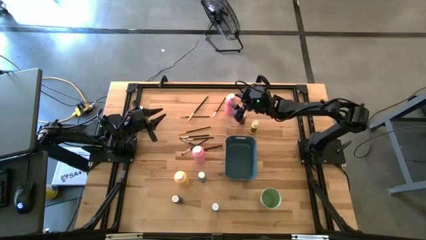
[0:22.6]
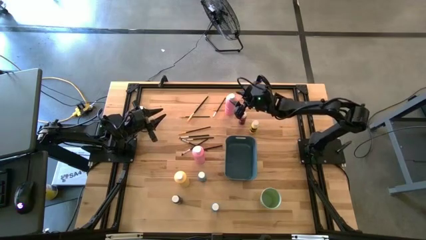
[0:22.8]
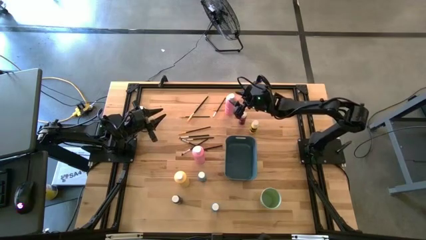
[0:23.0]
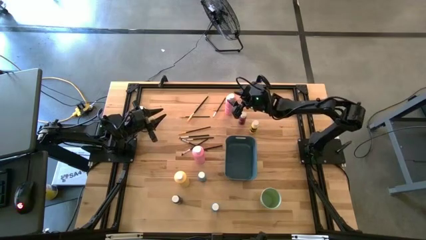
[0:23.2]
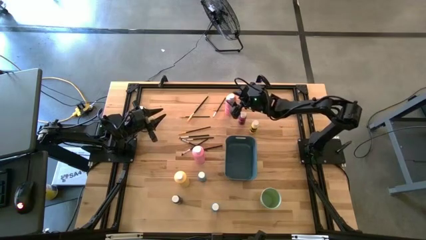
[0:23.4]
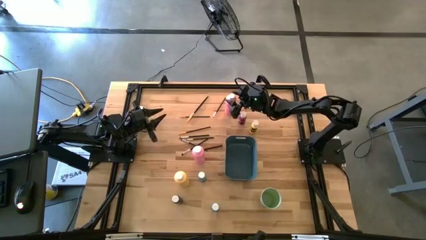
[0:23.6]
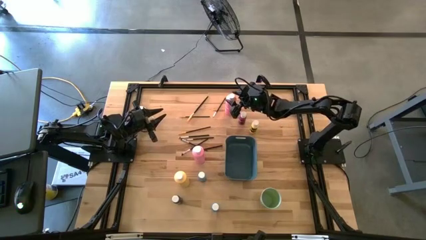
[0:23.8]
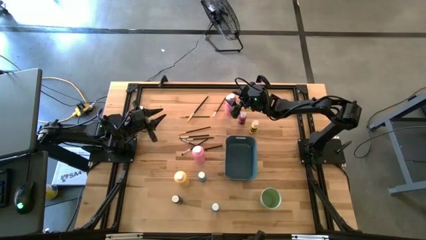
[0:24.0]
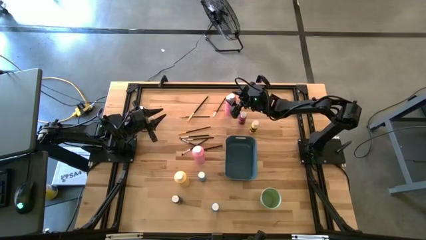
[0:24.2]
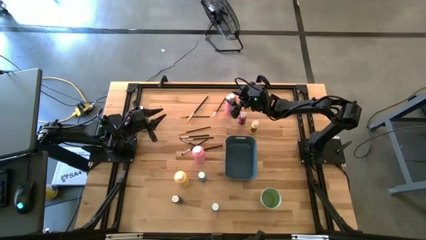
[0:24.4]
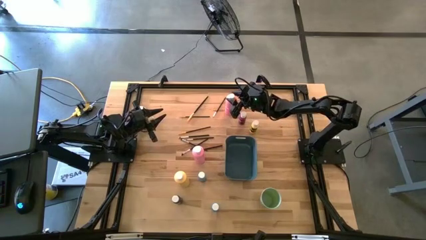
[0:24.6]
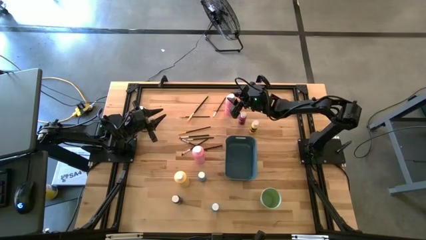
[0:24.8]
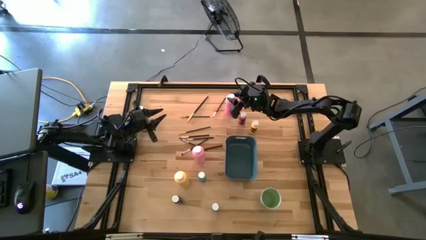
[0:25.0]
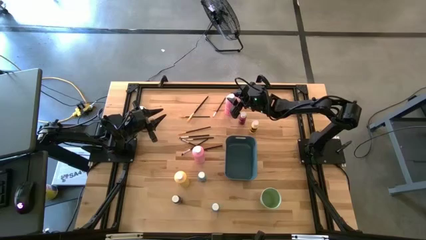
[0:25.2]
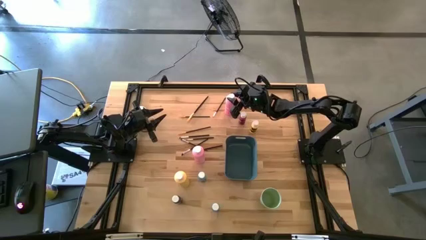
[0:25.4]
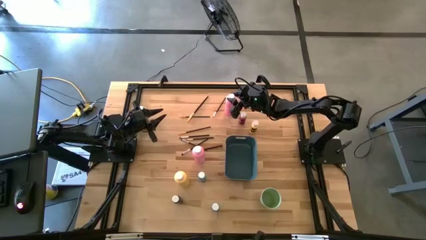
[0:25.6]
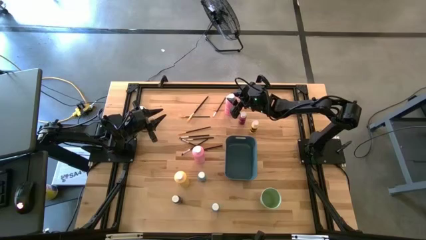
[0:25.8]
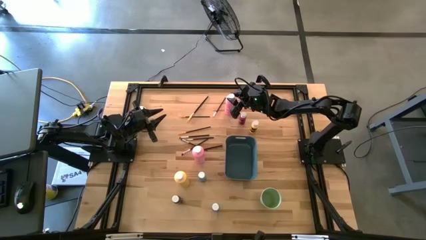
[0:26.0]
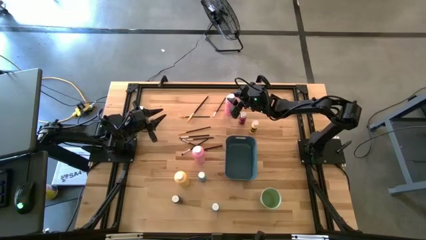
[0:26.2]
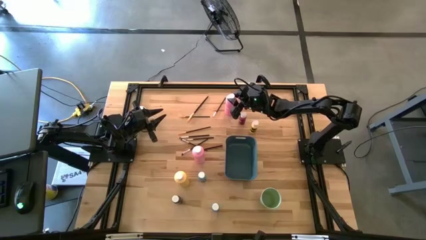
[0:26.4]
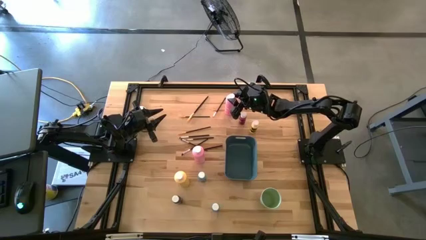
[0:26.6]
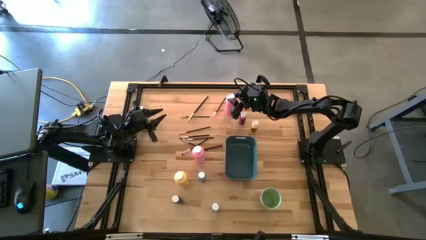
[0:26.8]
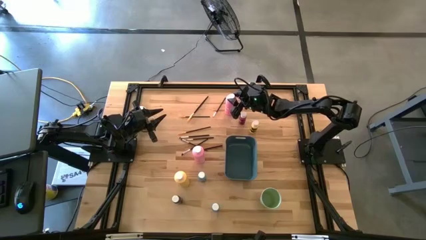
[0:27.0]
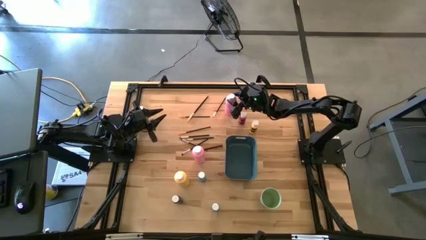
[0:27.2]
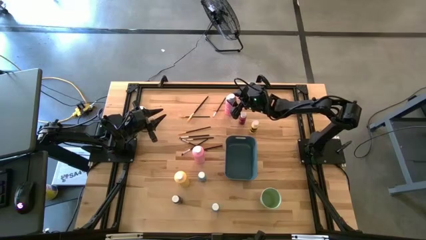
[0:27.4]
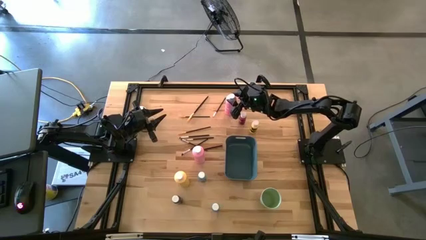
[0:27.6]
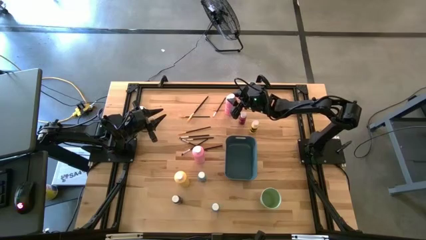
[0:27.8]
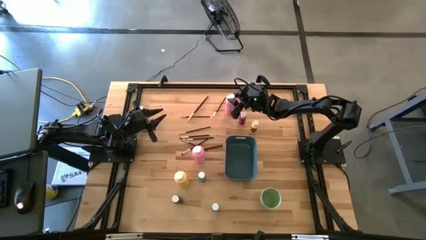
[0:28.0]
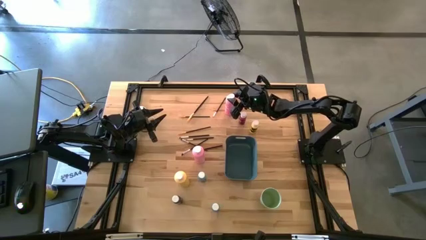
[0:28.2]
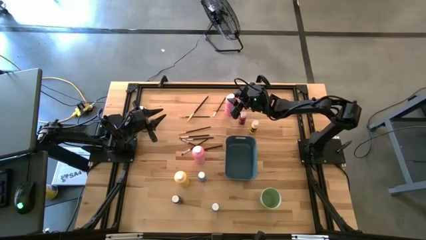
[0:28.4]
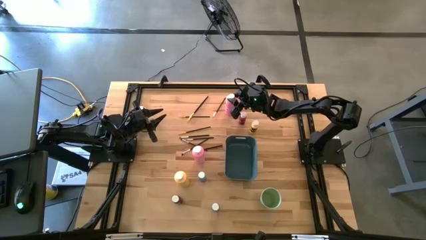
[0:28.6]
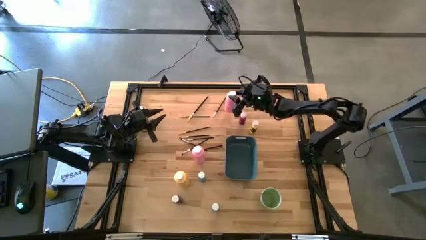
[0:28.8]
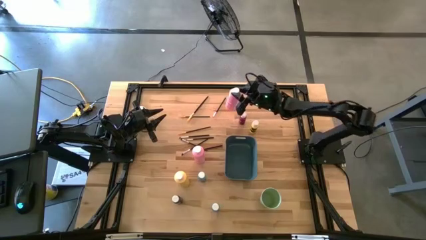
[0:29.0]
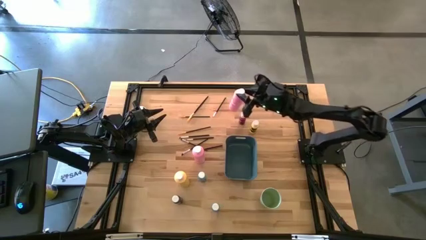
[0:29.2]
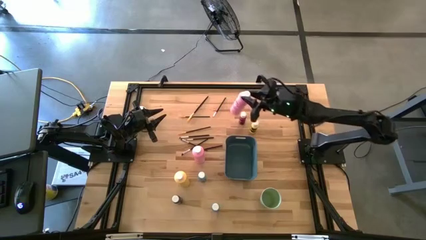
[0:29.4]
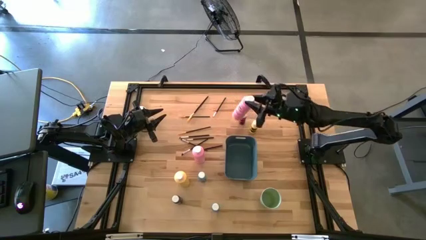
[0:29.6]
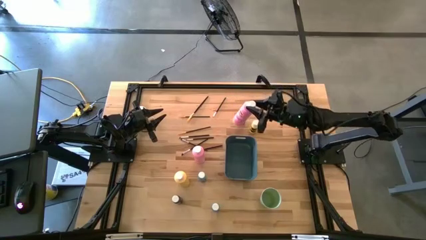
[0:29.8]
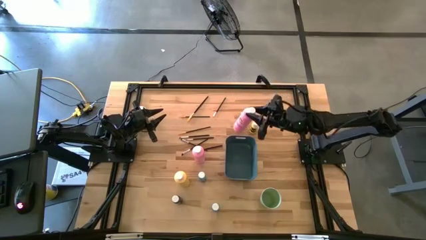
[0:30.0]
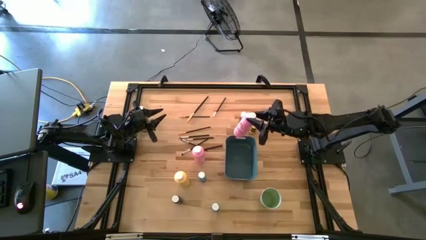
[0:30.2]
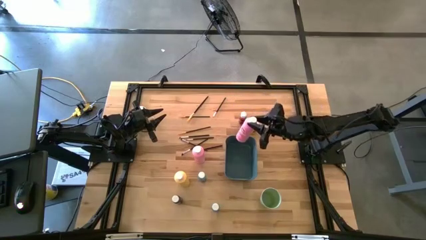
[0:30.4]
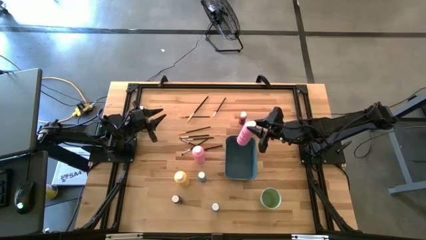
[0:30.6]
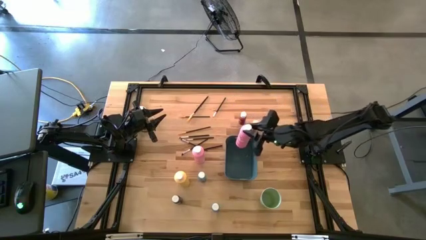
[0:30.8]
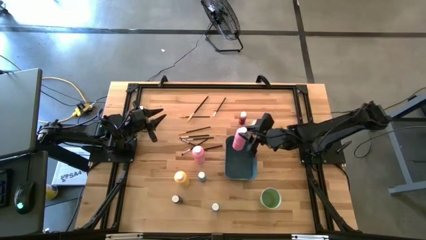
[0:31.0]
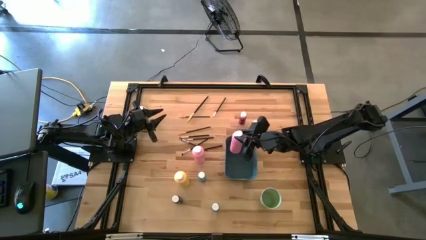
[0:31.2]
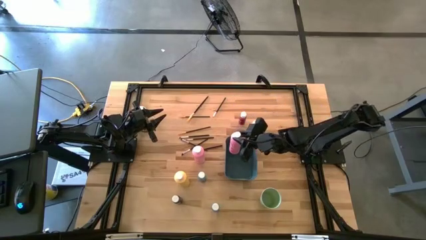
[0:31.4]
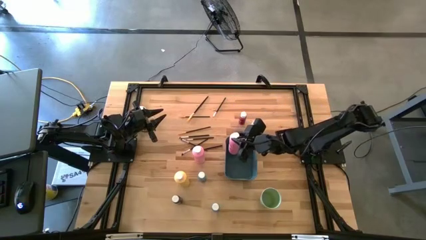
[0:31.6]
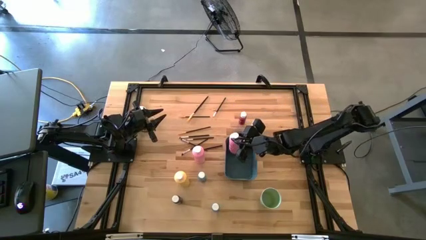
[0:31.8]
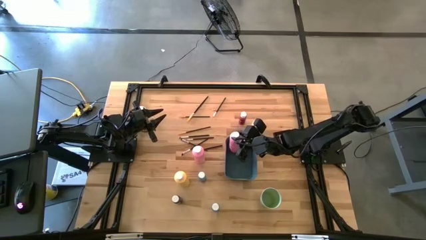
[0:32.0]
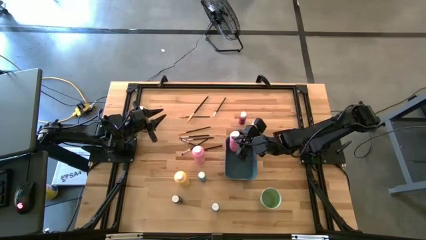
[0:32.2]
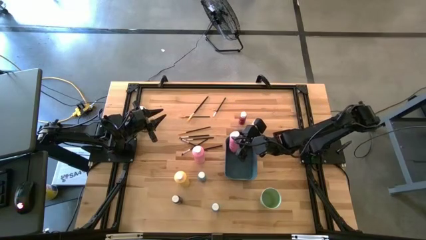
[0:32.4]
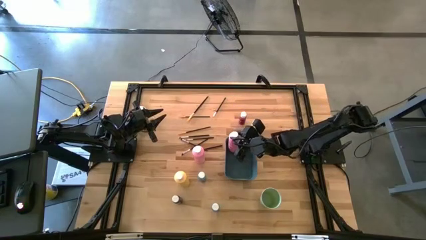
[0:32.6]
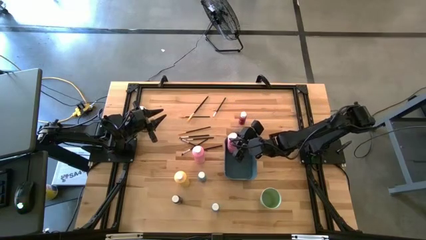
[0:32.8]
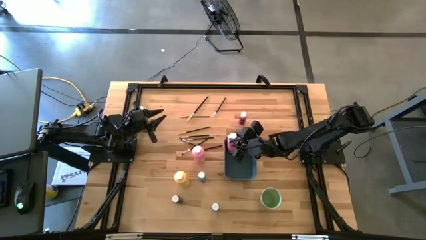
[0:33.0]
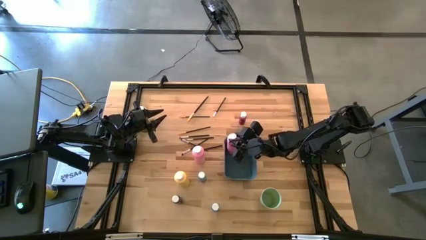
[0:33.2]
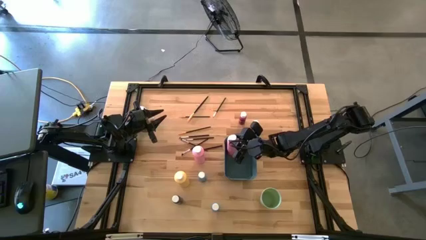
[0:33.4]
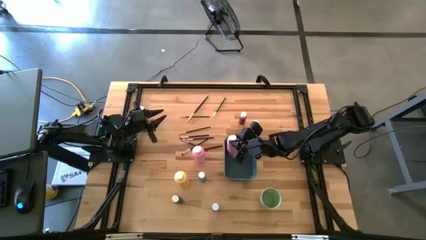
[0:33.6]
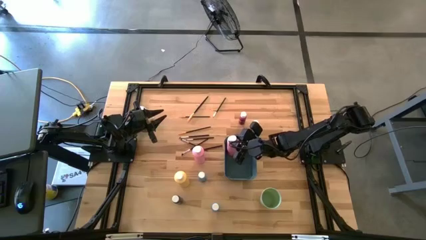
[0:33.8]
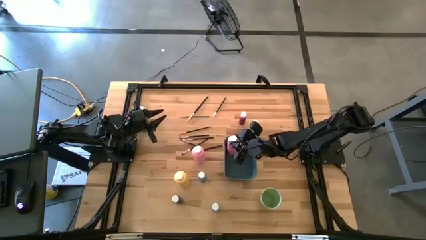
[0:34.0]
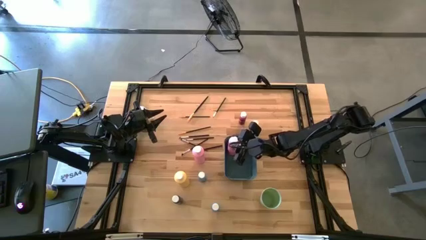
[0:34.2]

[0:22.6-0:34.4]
Task: Pick & Place Paint Supplies
Put the large pink paint bottle into the blue bin

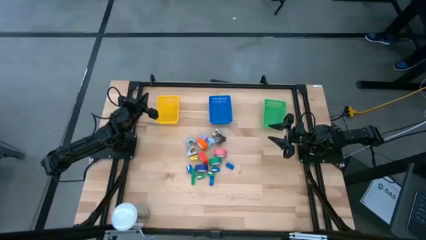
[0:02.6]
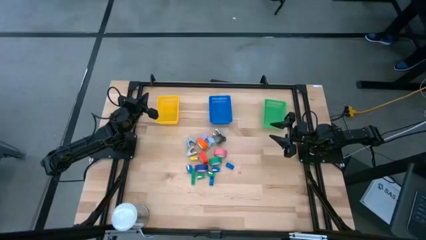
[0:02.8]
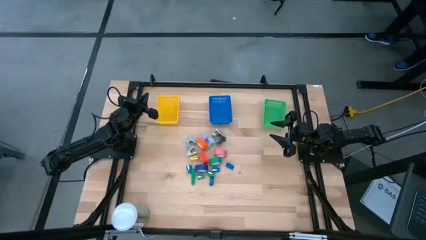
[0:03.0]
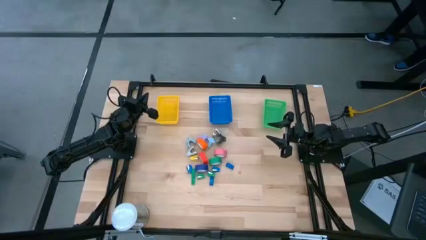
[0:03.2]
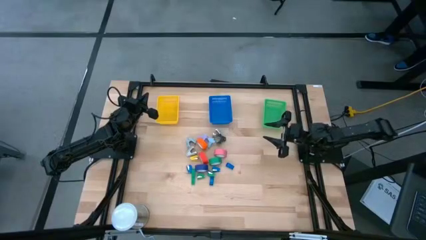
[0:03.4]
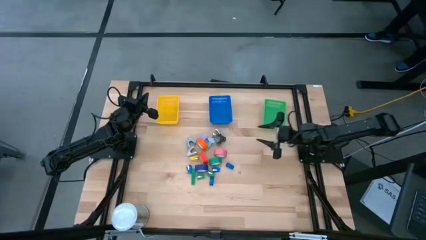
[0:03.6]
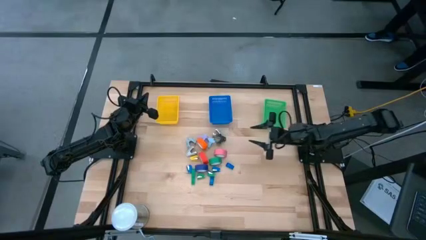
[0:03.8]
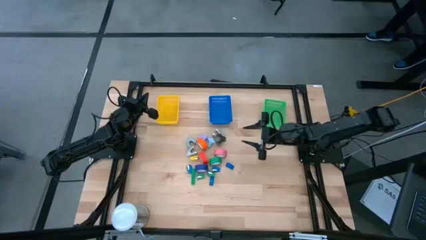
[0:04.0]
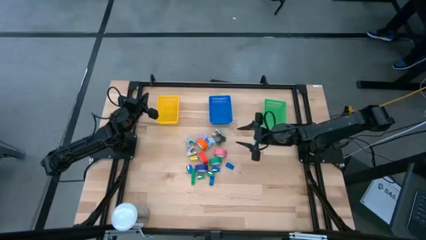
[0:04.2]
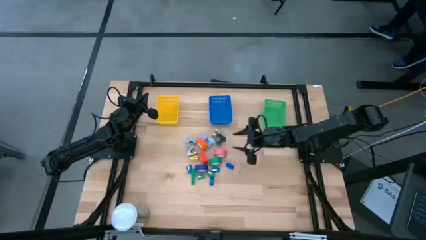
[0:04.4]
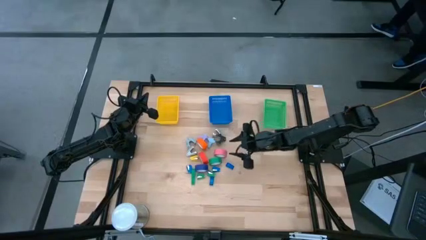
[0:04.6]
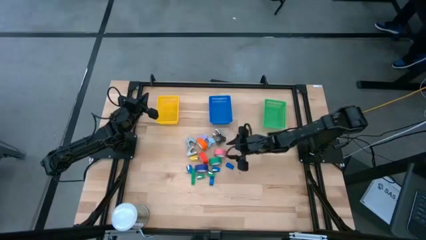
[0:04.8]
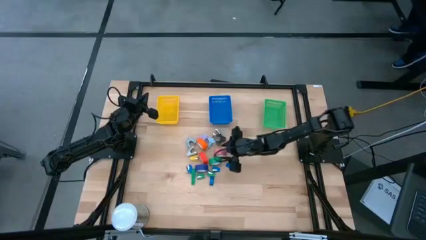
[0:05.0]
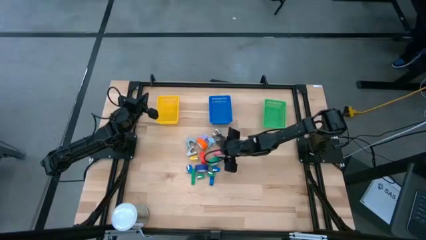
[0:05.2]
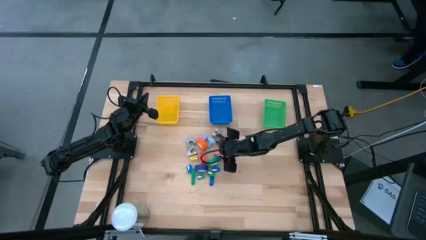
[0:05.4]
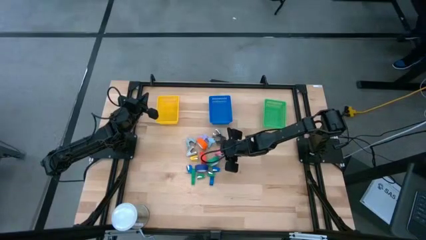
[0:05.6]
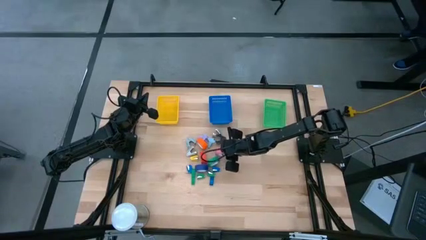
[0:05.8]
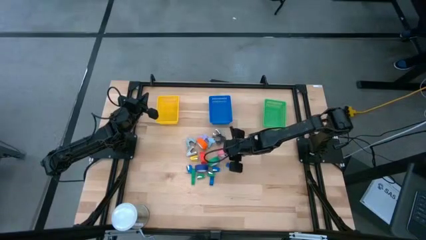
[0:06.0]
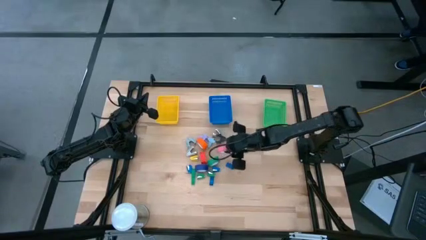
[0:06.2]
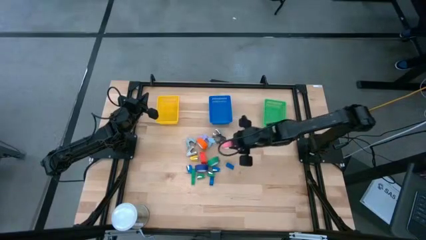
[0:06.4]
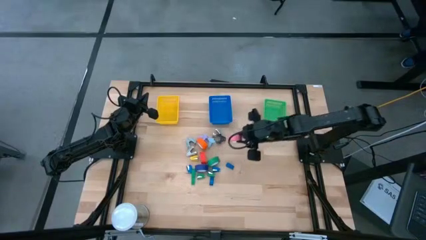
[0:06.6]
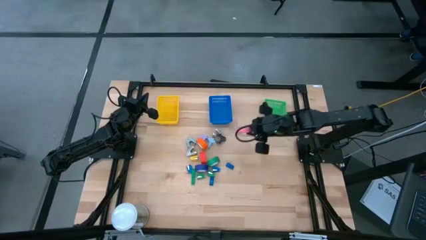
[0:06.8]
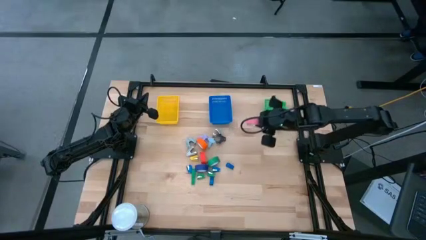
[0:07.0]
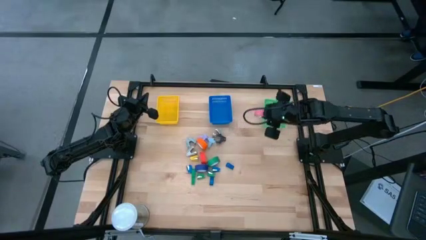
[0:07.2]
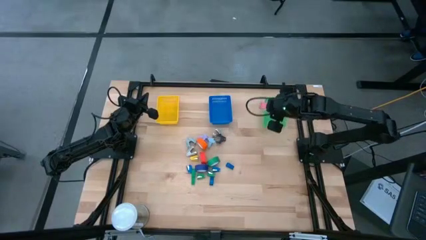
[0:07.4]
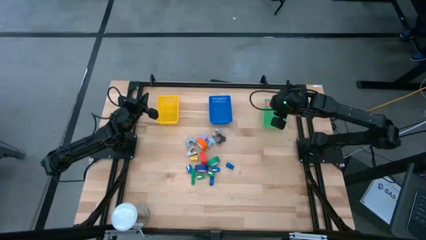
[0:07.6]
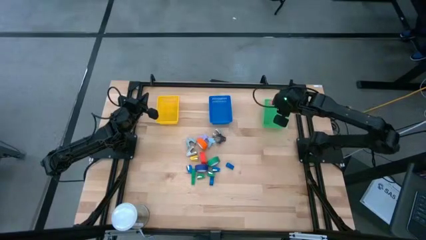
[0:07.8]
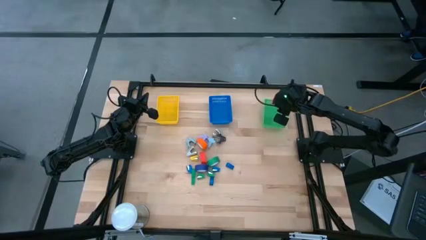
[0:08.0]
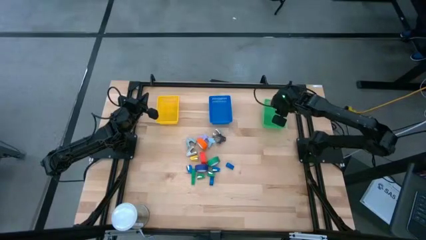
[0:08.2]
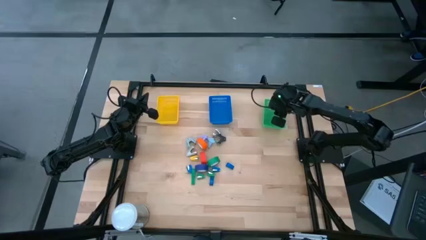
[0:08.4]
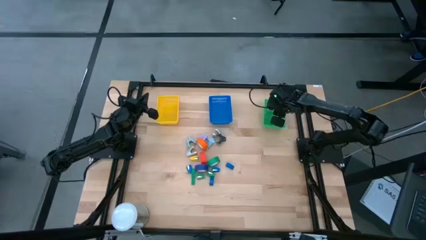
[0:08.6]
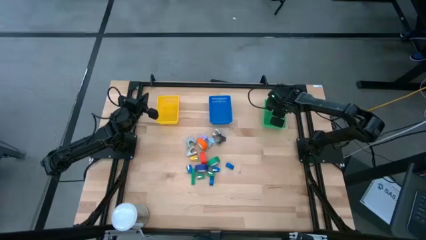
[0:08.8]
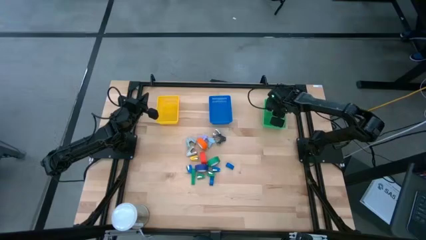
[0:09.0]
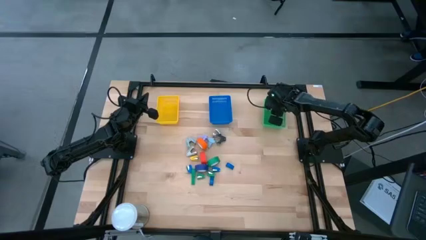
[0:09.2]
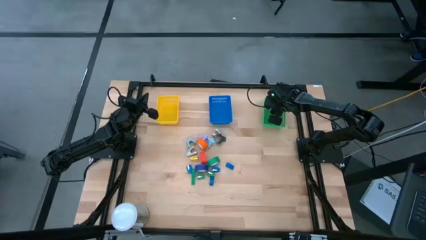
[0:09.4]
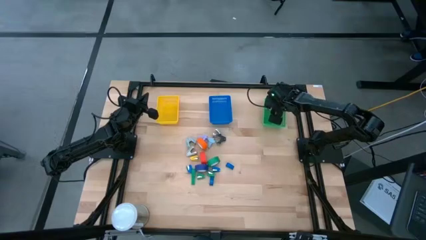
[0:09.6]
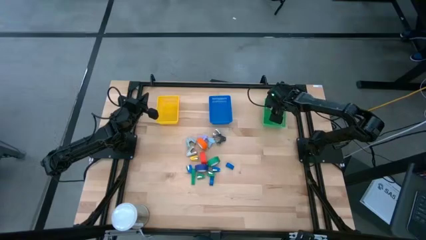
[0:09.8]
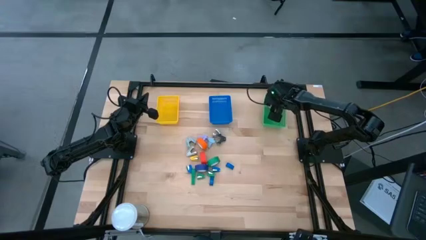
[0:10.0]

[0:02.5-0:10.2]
Task: Pick and place Stapler, Stapler remover, tape
Put the pink tape into the green basket
